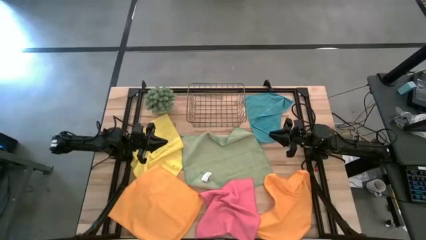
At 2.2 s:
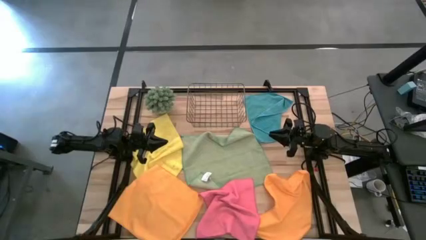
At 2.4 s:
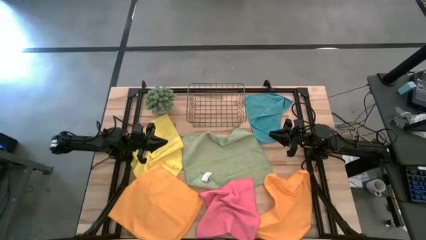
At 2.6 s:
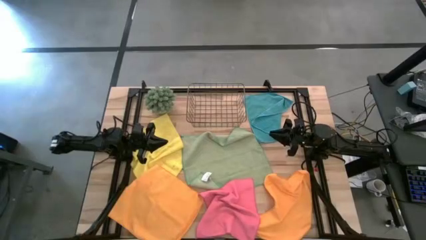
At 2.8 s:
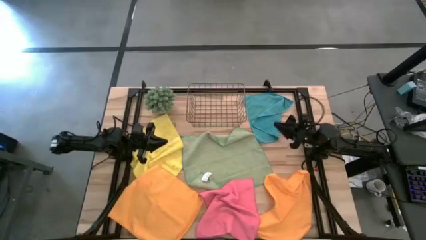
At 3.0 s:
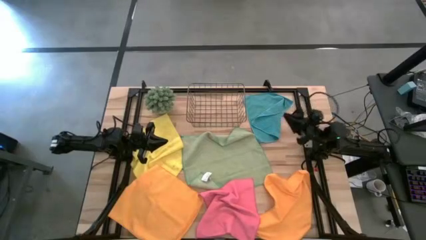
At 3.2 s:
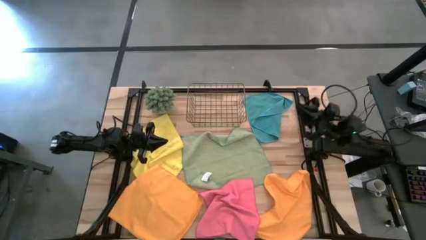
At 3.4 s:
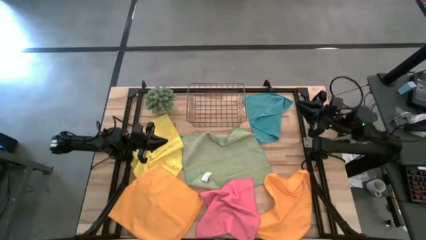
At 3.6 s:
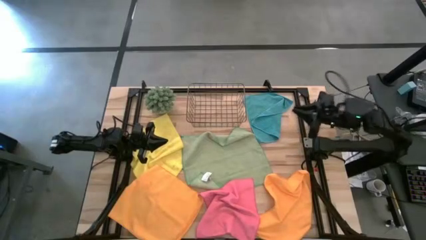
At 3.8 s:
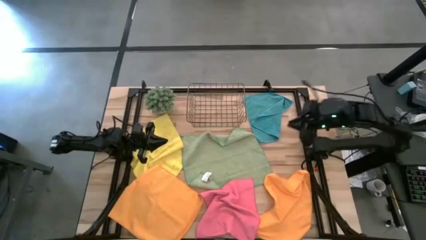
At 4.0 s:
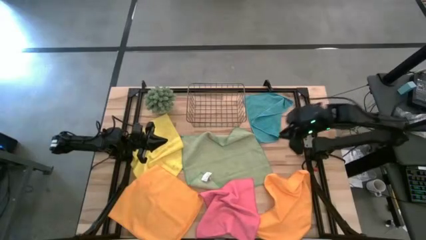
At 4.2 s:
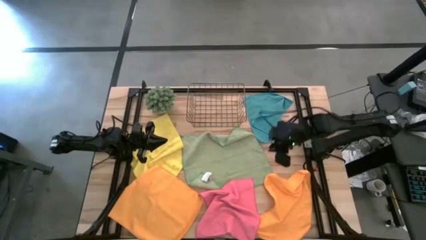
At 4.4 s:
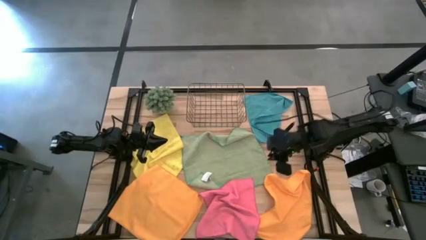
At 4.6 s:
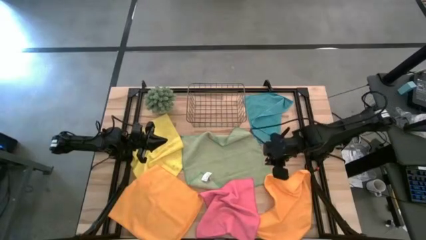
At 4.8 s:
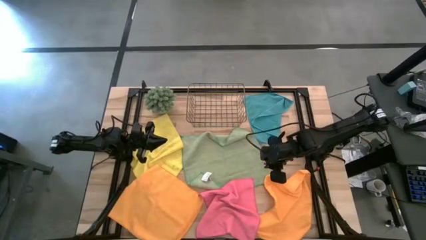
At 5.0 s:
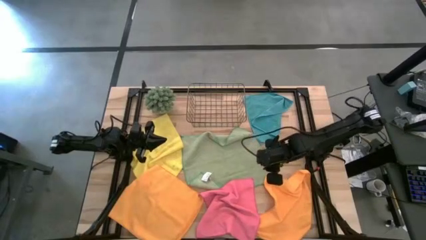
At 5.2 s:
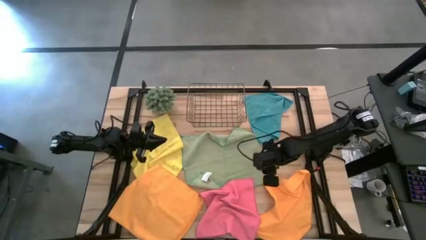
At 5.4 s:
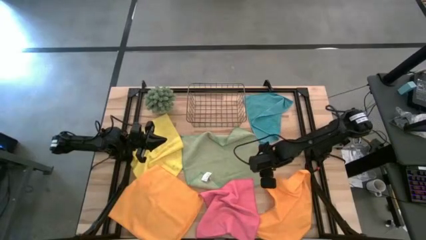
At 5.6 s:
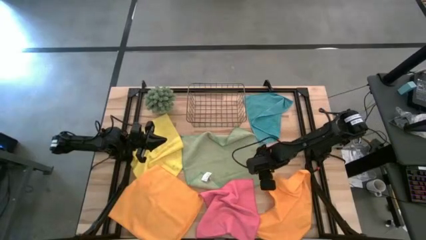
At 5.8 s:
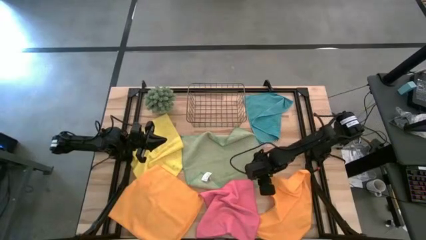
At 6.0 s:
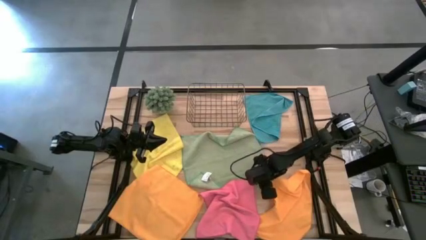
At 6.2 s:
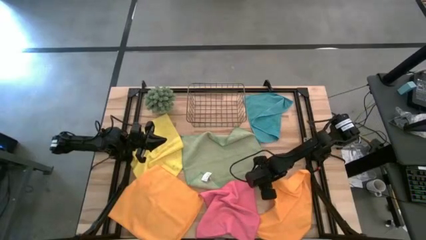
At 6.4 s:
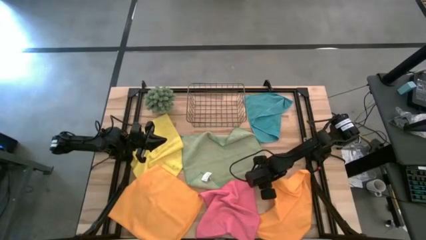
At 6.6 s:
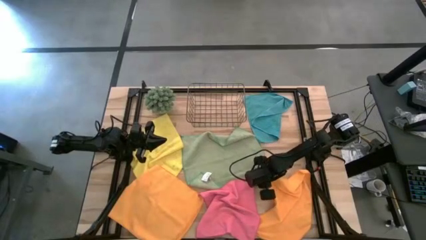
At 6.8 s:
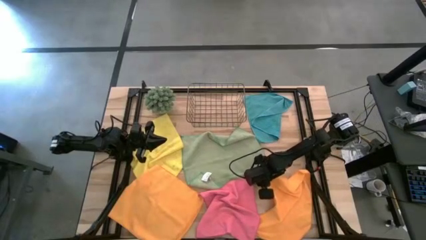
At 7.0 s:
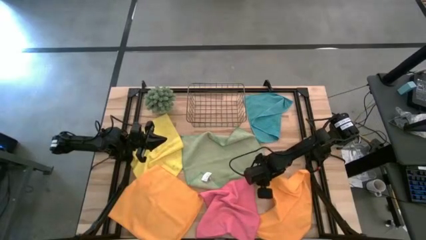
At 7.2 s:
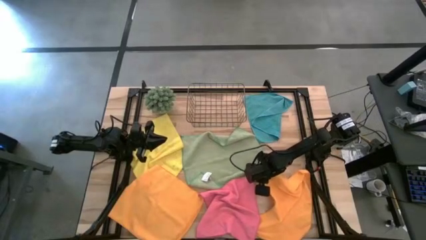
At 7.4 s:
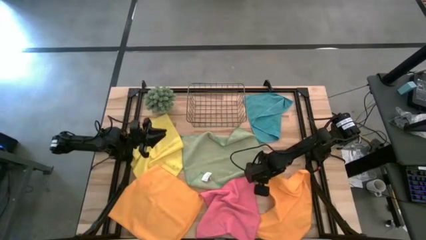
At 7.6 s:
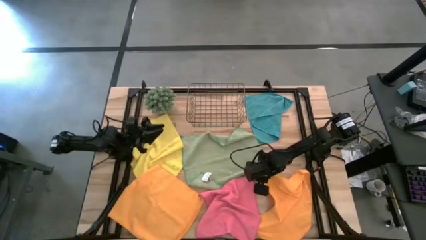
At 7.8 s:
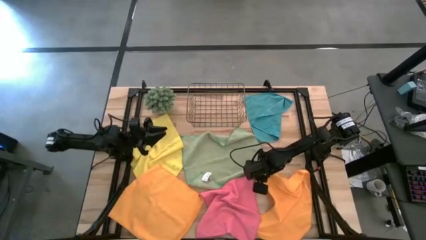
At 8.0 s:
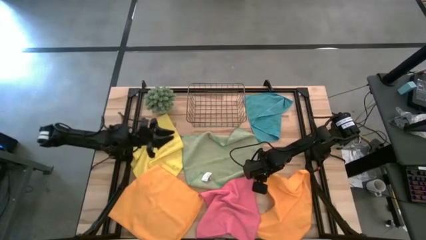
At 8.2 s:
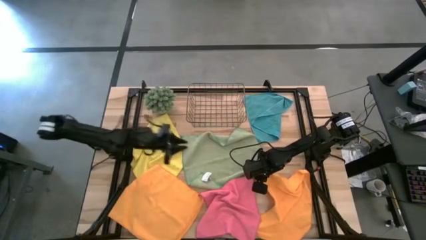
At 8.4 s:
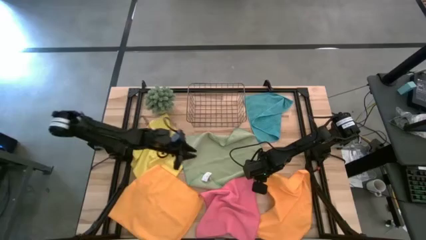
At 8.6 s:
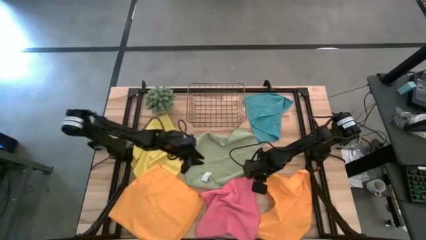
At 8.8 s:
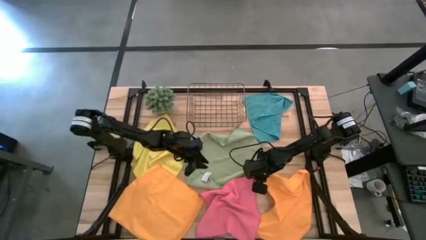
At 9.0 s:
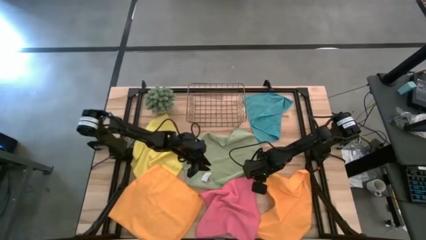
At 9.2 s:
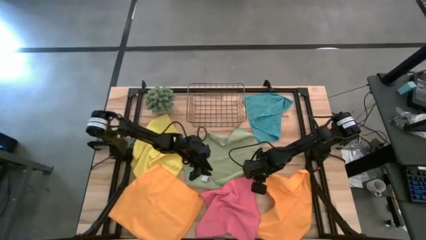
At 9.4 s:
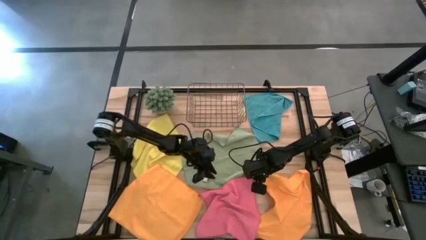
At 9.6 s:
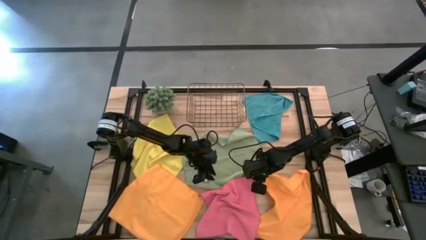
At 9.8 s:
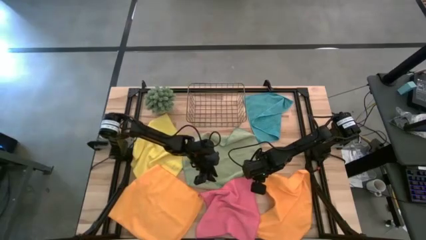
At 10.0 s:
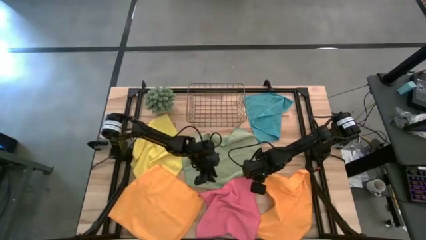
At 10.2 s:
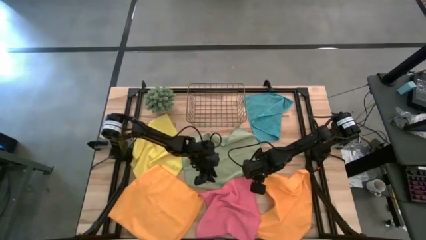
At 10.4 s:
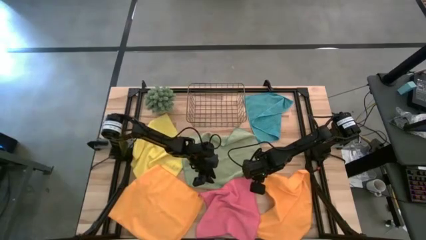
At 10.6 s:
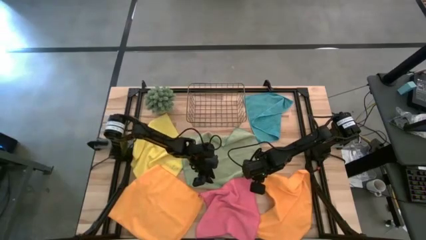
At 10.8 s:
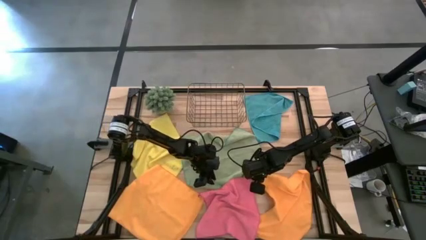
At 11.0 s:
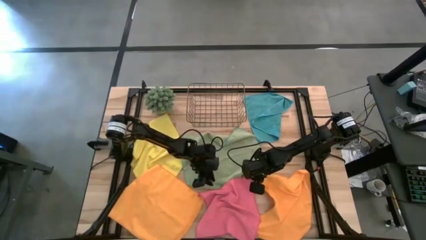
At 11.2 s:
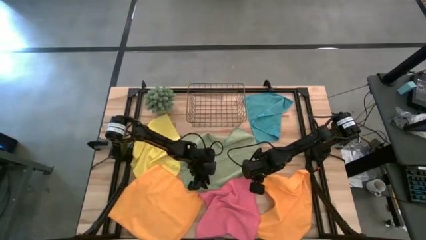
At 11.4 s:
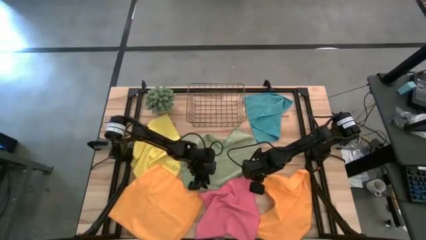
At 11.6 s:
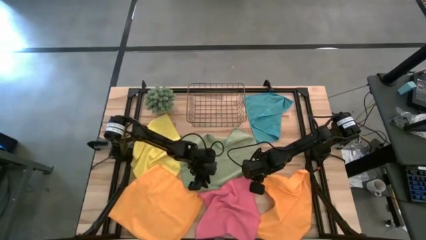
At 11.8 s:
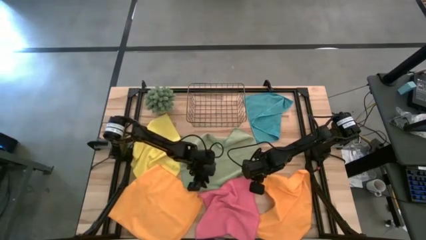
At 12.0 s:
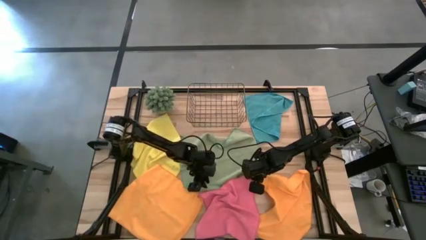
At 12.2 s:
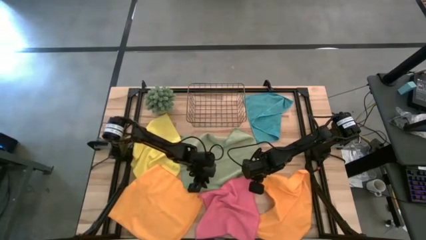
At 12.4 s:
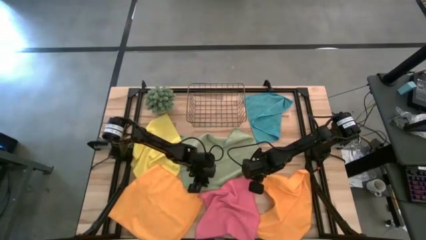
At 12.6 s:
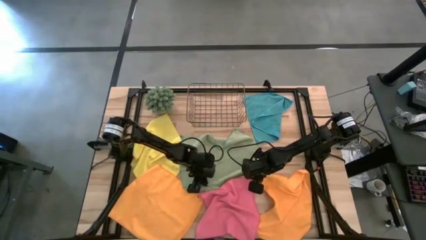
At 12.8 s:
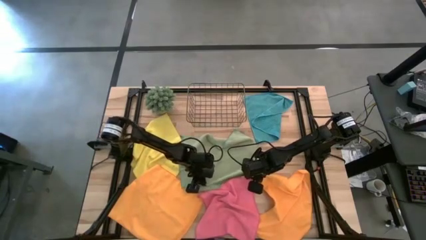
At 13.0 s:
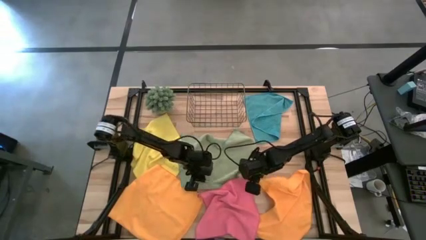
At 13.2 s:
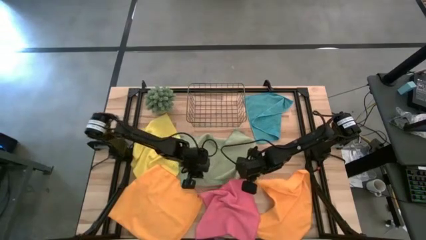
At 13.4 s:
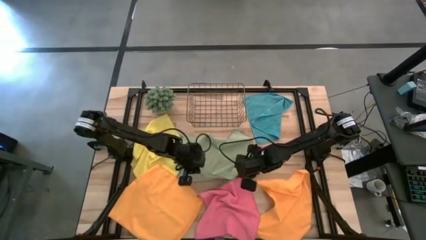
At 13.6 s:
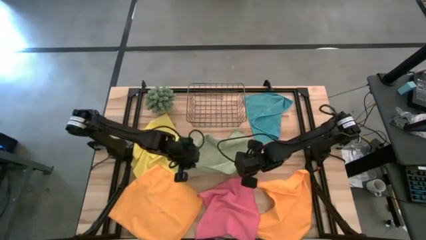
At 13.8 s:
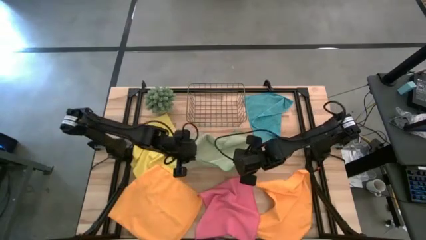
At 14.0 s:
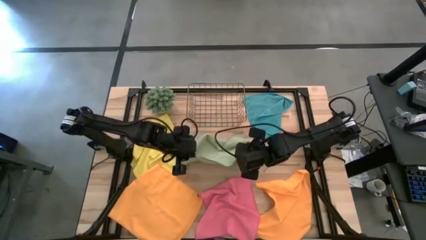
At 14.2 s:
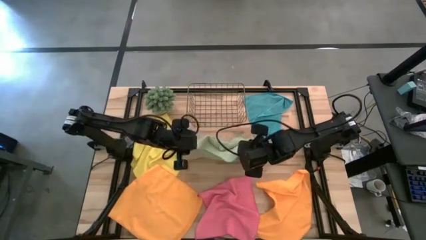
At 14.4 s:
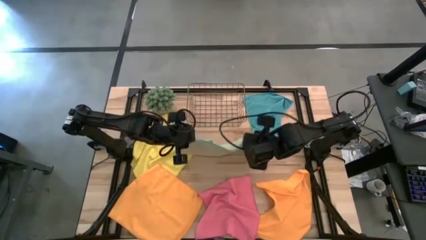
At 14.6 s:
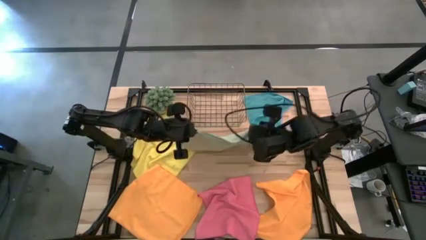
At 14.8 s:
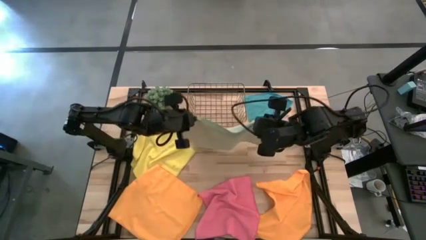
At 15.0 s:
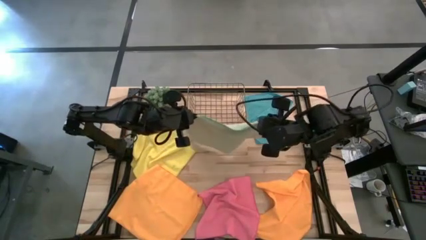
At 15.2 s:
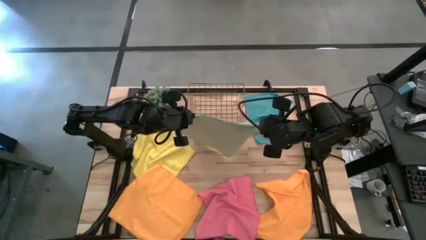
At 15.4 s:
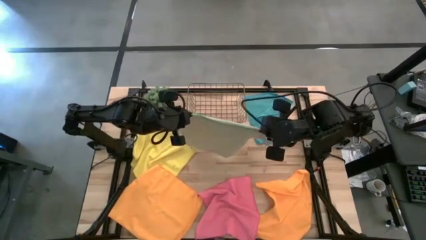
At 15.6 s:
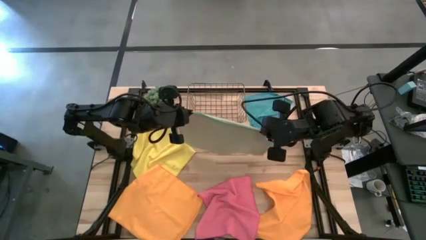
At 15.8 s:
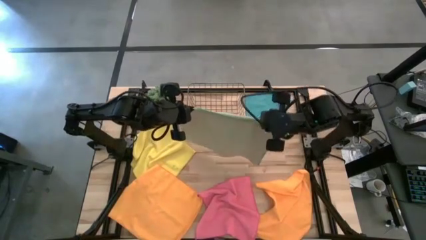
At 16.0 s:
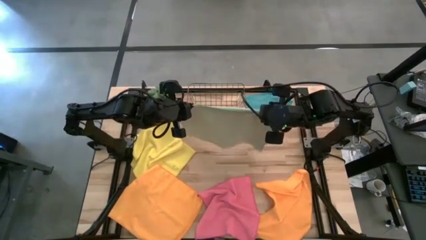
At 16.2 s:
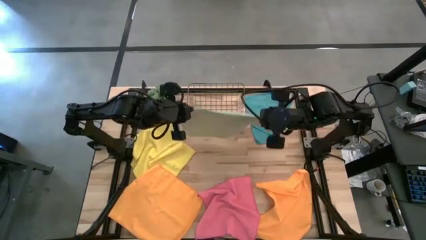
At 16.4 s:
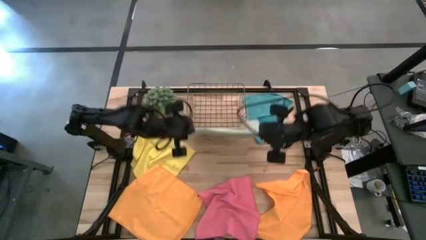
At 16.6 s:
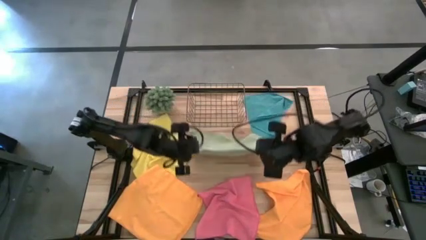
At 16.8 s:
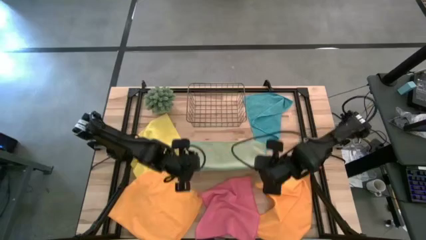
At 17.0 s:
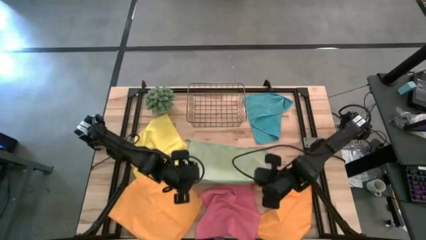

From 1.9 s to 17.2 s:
Task: Fold microfiber towels
Fold the green towel
